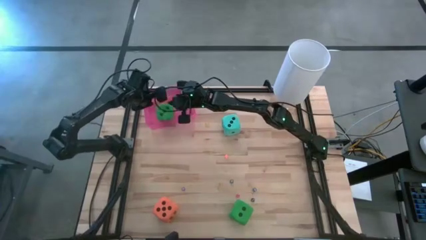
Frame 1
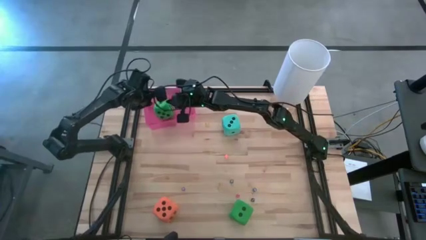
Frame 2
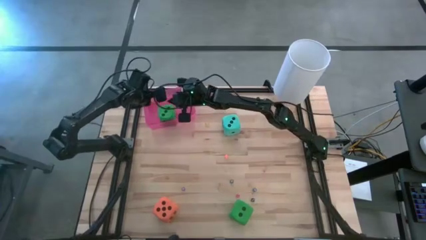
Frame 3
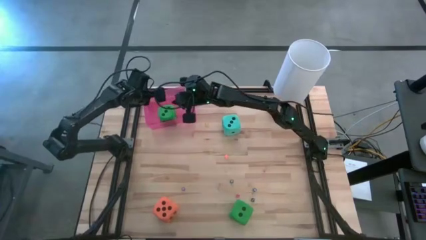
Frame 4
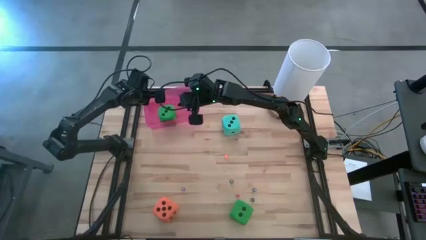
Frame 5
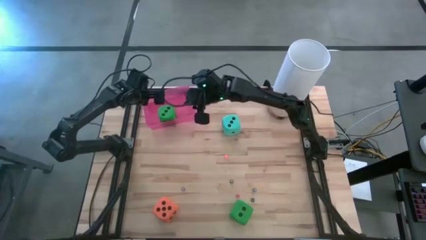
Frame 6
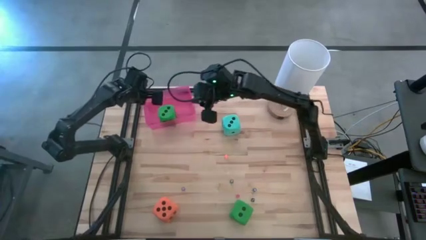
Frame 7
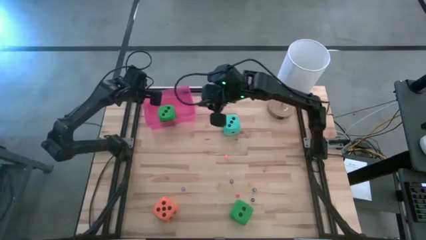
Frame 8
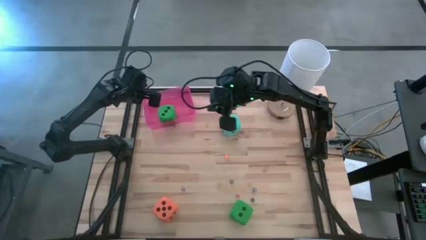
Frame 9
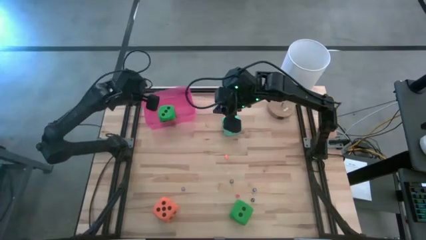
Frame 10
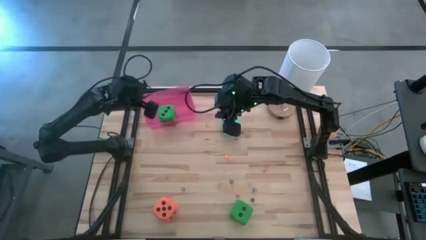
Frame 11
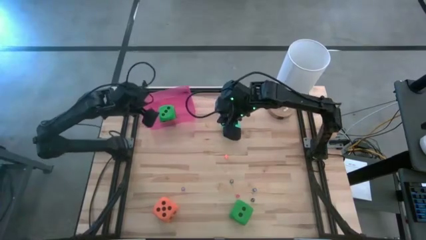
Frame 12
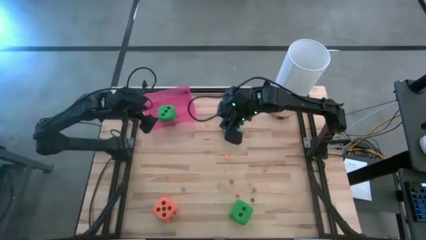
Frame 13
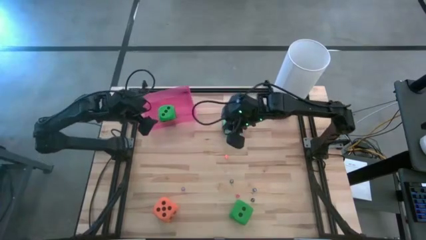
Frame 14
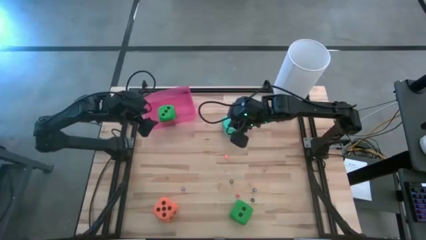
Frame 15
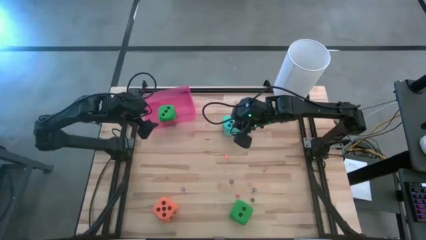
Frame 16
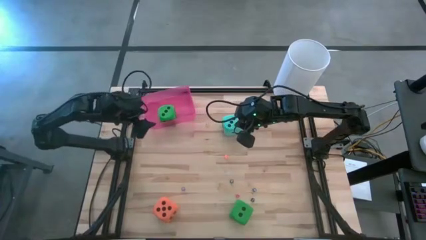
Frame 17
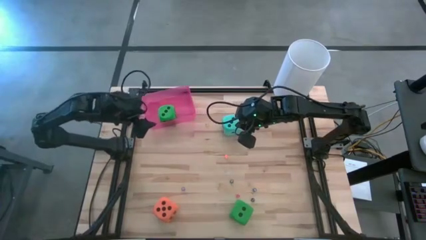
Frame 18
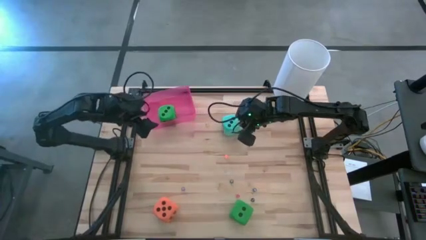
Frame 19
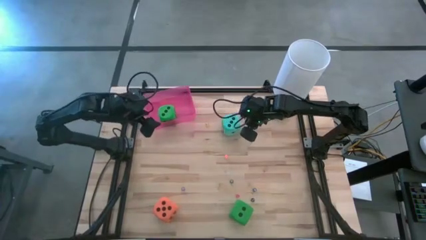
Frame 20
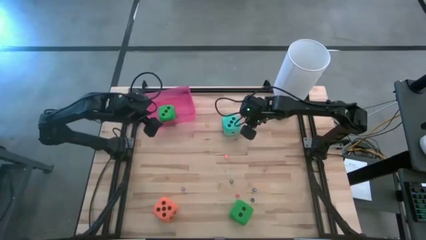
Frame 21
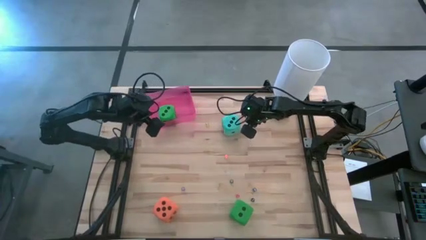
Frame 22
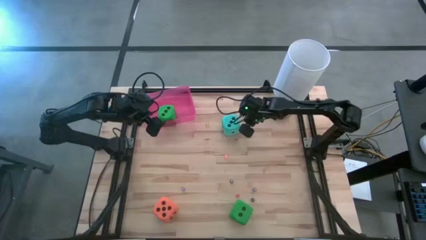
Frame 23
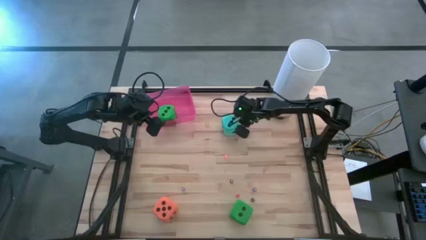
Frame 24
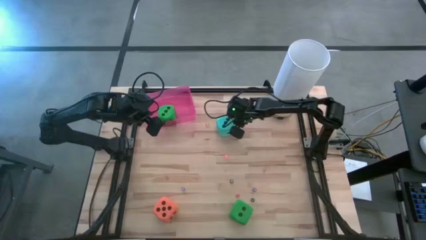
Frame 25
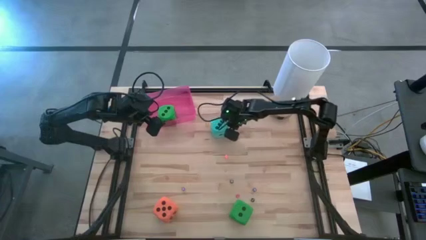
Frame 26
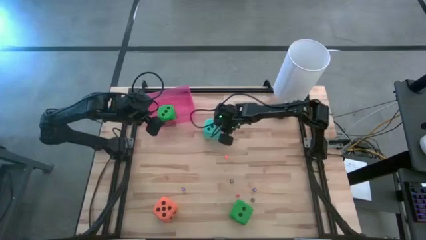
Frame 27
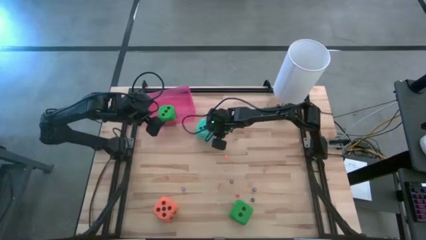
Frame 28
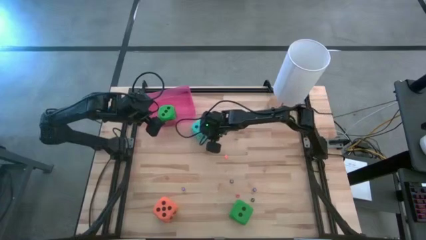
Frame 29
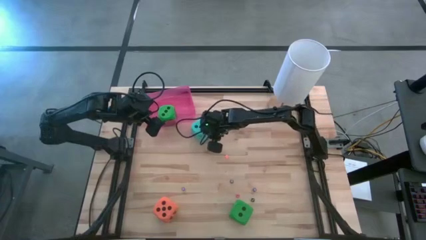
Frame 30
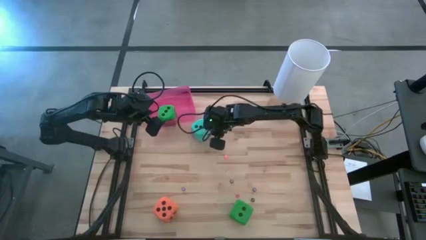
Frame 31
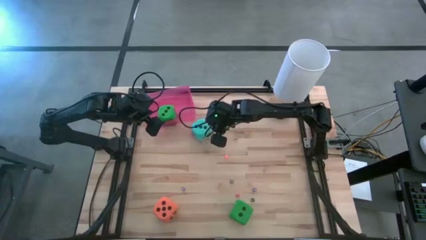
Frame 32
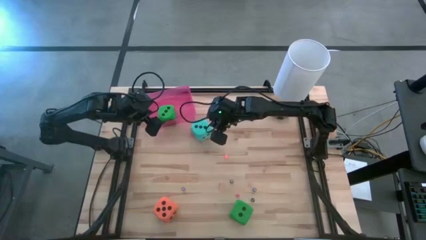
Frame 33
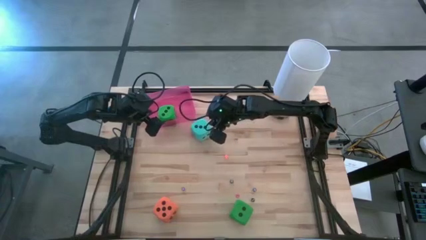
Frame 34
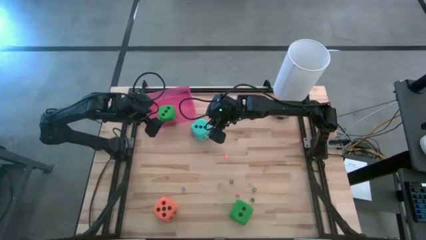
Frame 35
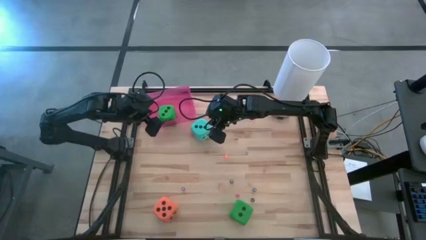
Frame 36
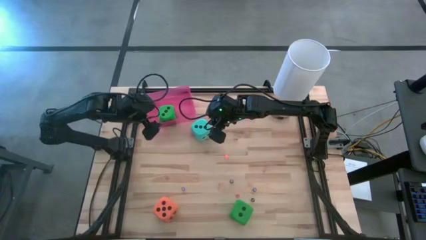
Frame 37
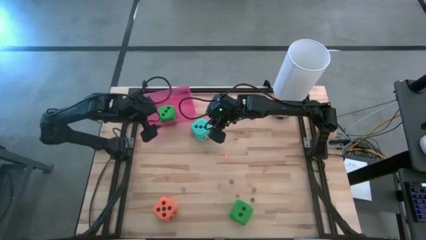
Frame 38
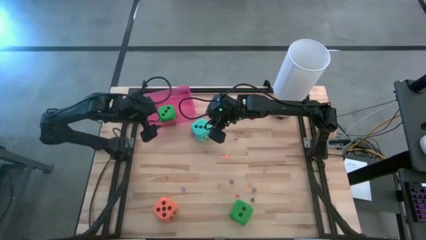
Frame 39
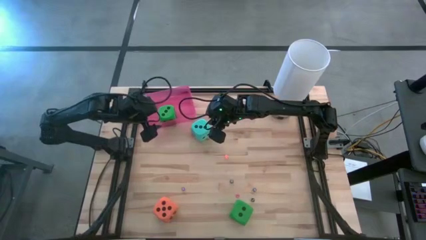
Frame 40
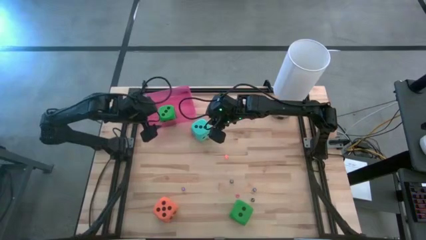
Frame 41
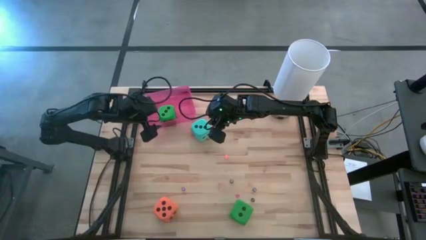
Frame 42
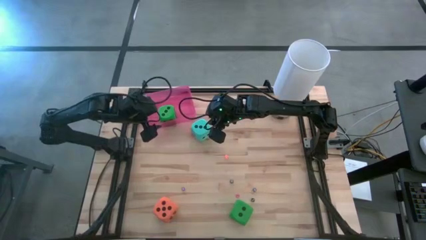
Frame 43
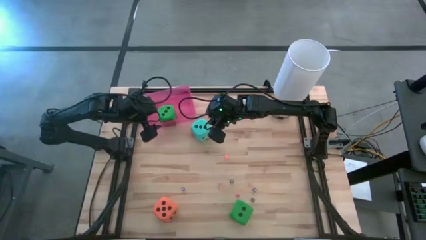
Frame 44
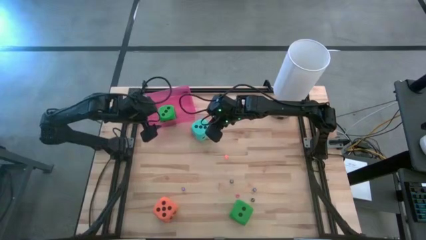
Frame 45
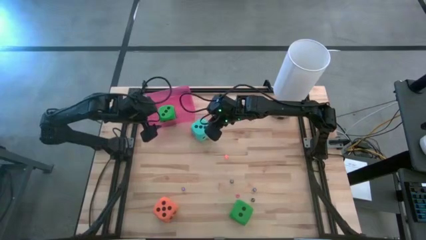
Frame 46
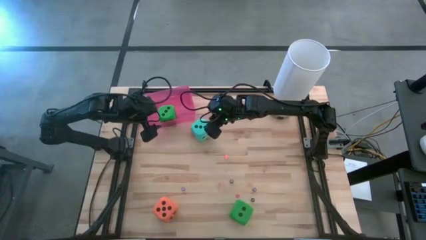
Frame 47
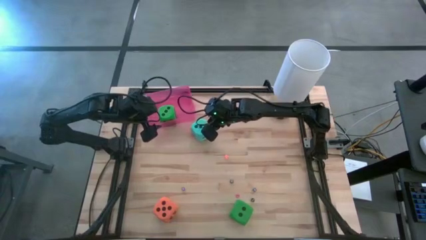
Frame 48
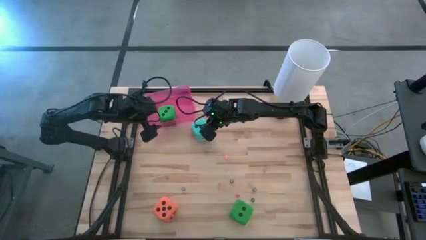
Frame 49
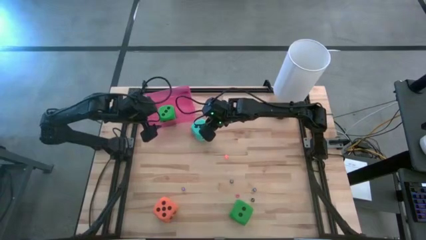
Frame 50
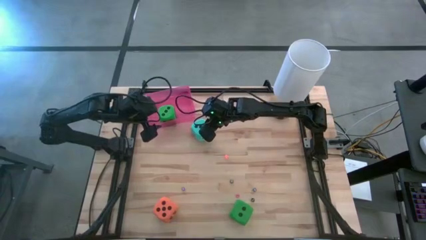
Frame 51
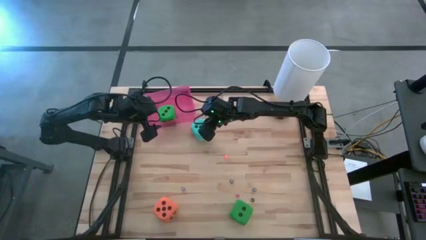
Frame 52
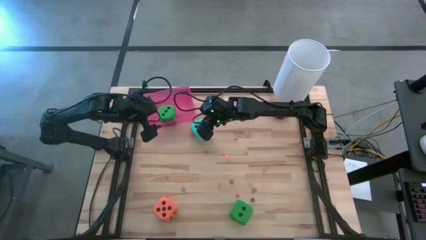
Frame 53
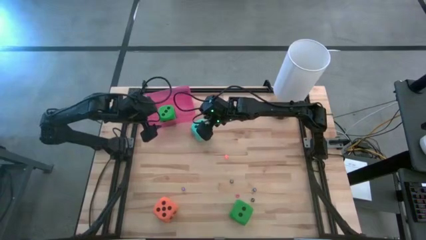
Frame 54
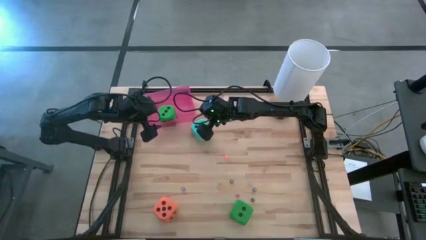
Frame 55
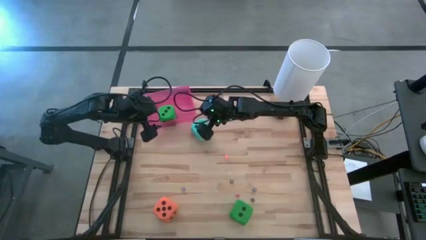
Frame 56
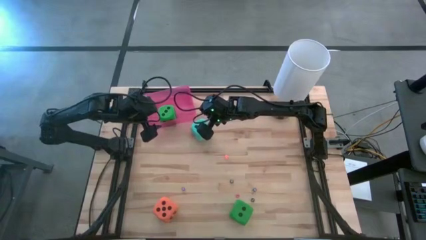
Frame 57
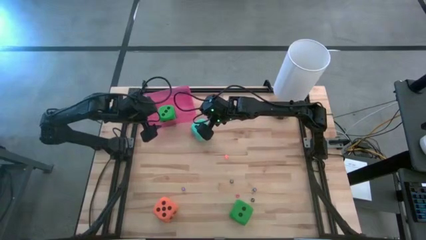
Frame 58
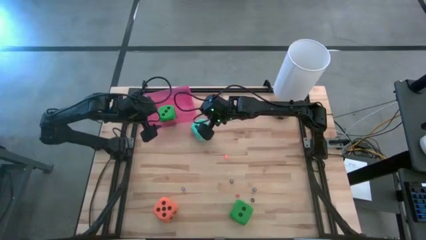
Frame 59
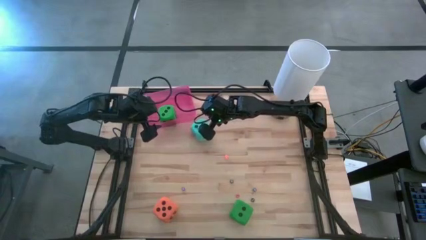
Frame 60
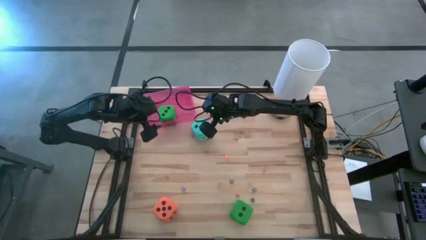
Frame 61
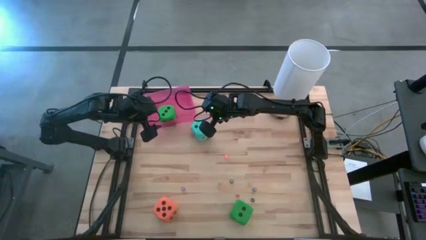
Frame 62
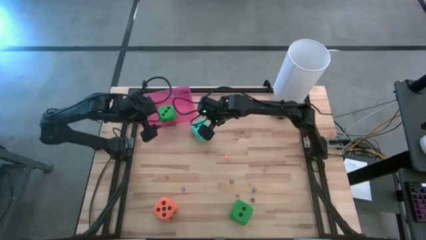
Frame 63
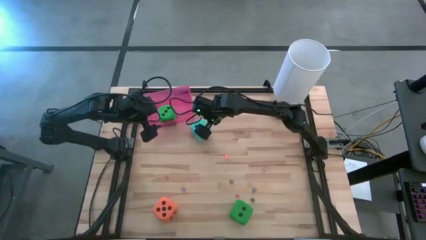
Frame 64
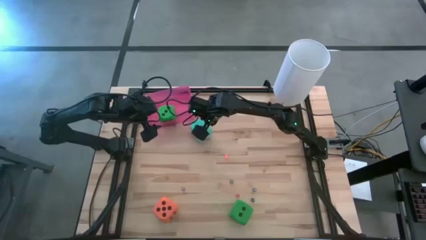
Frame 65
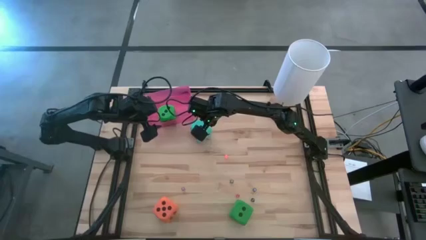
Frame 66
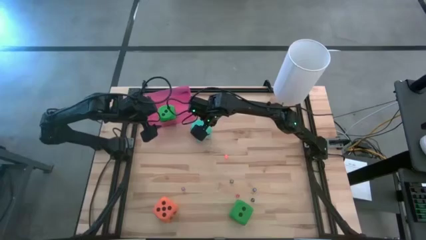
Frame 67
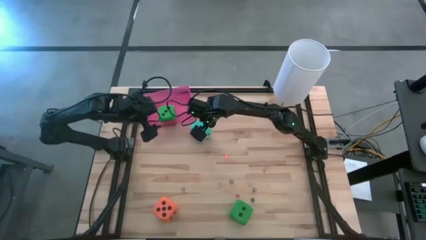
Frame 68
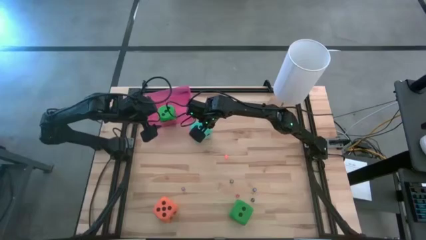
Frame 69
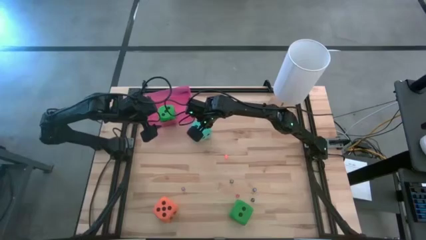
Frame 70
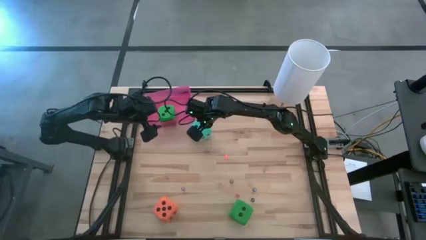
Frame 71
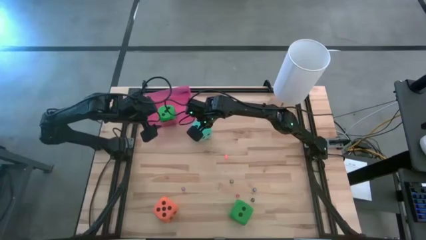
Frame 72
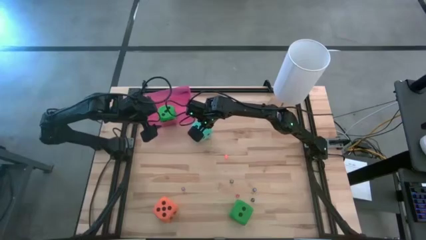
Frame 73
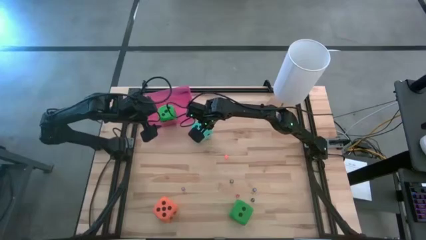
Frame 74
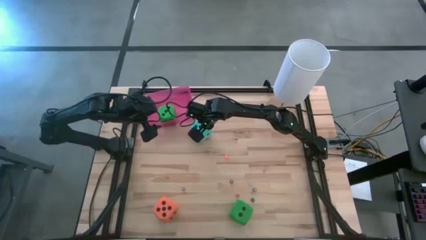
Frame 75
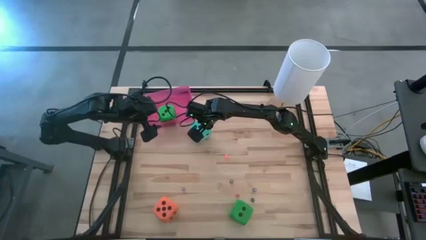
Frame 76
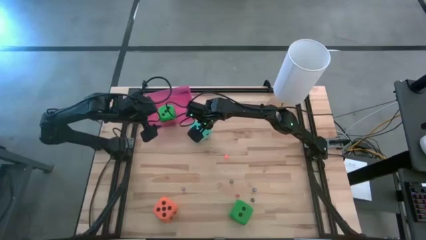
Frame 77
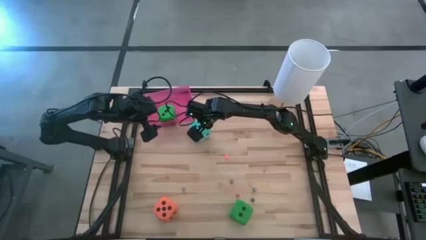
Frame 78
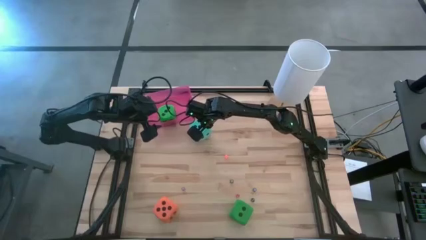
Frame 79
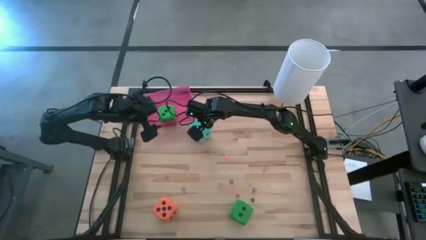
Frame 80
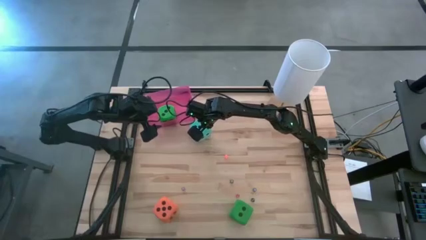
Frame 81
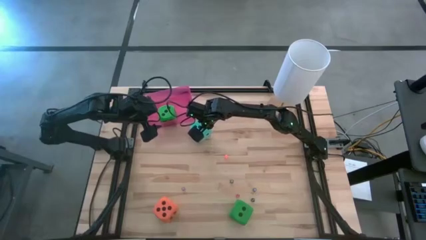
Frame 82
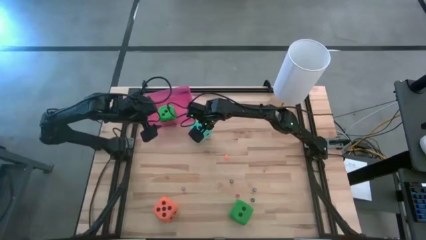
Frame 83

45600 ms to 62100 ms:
Task: Pick & Place Dice
Put the big blue dice into the red bin
